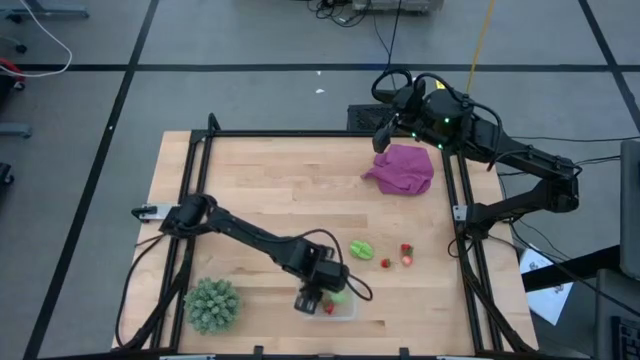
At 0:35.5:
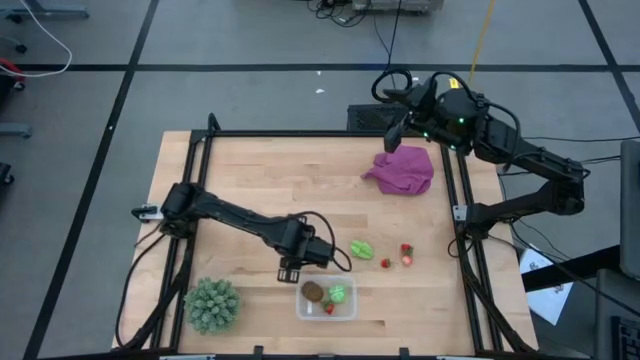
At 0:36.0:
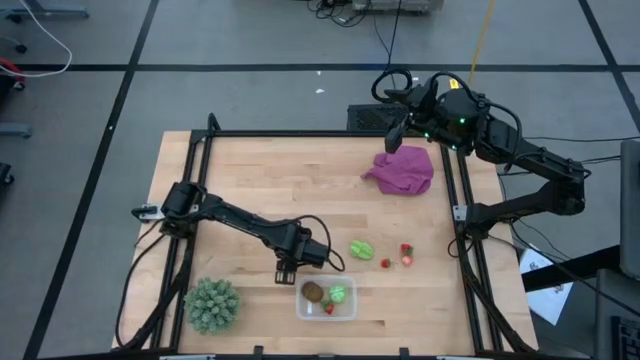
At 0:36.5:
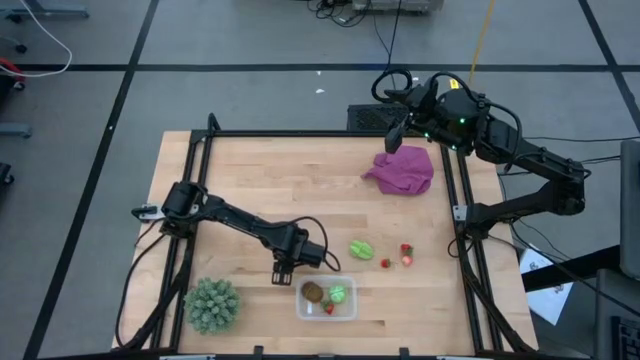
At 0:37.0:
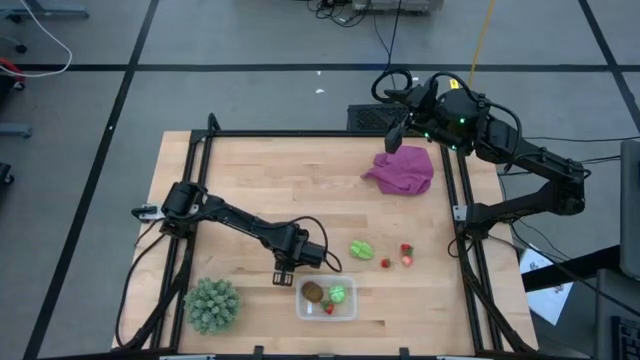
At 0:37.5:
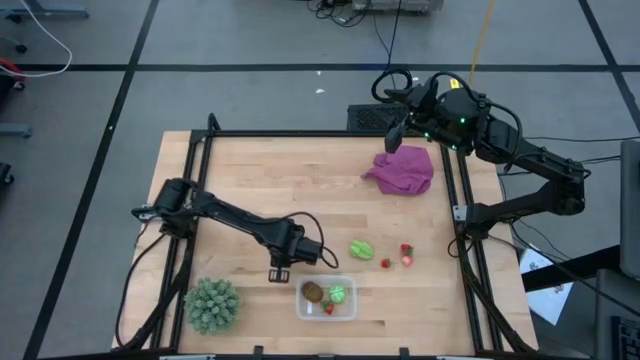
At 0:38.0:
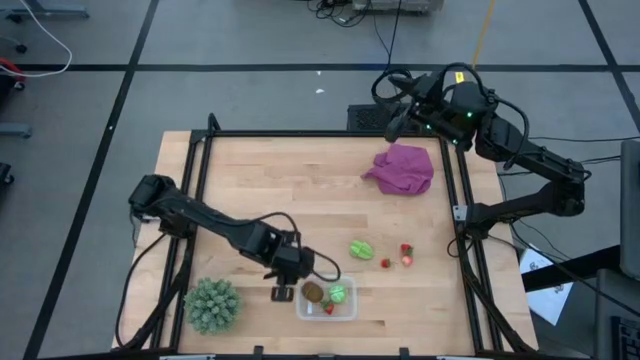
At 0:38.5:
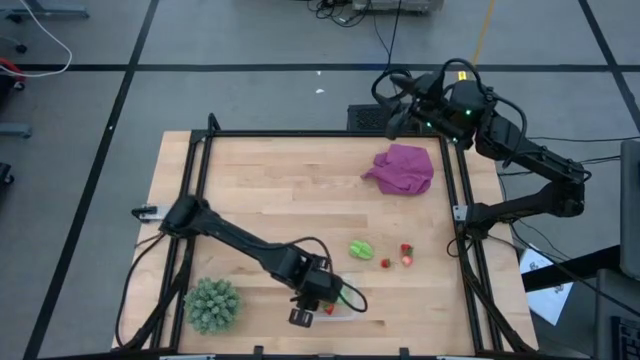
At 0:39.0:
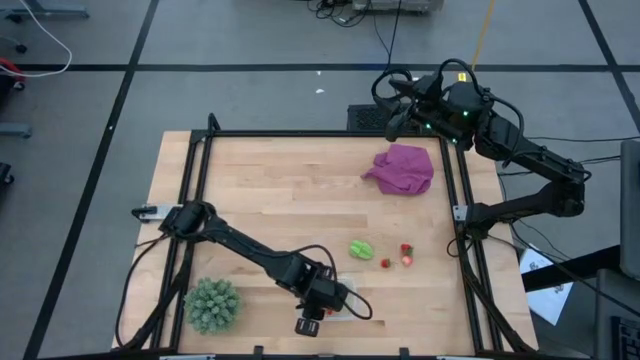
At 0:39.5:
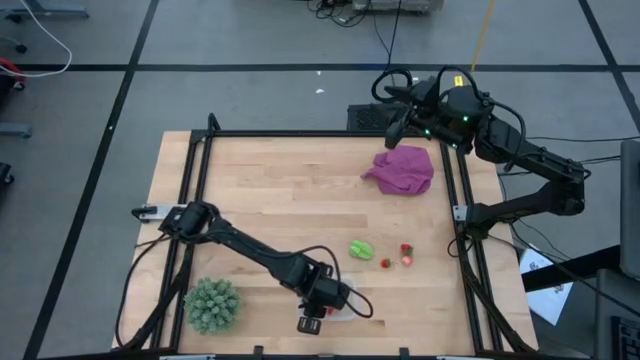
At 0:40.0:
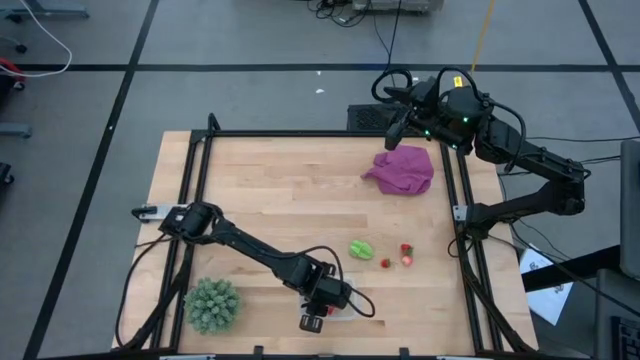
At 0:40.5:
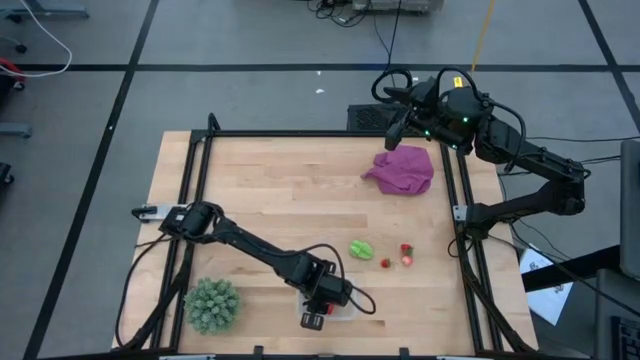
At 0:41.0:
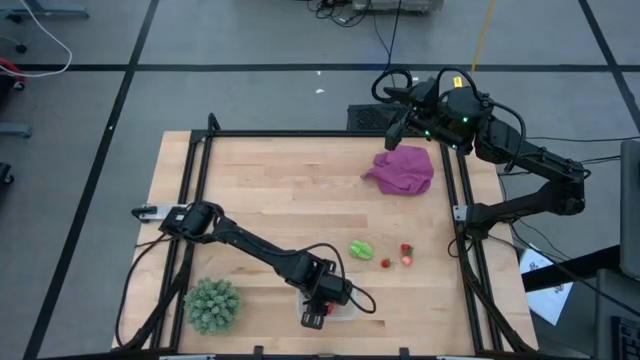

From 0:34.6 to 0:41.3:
Task: Pick and placing Produce into tupperware
Put the left pink peach into the transparent bin

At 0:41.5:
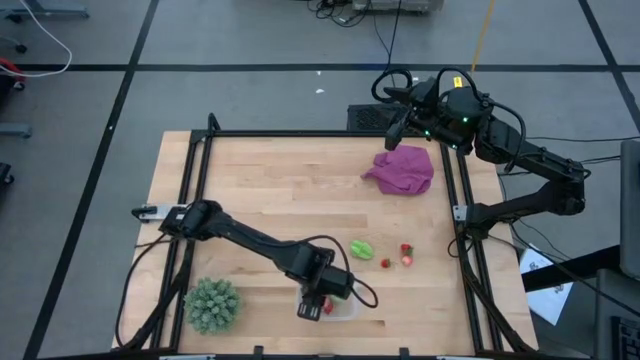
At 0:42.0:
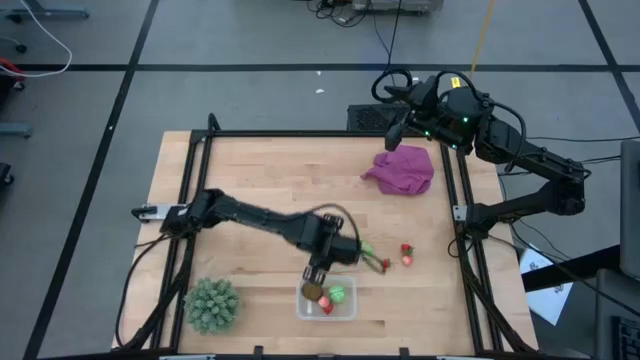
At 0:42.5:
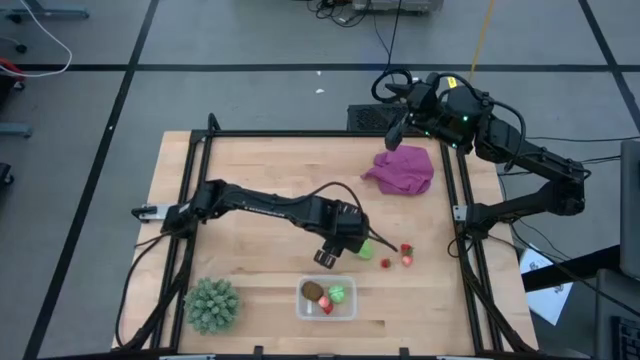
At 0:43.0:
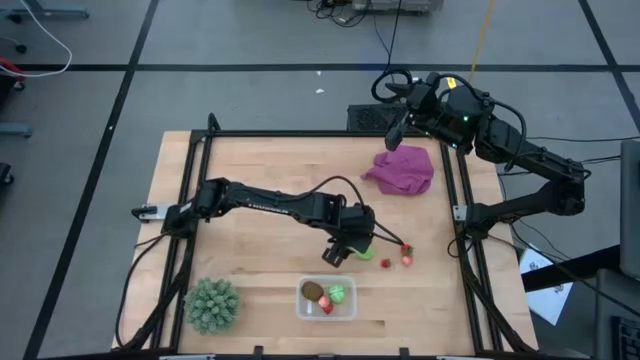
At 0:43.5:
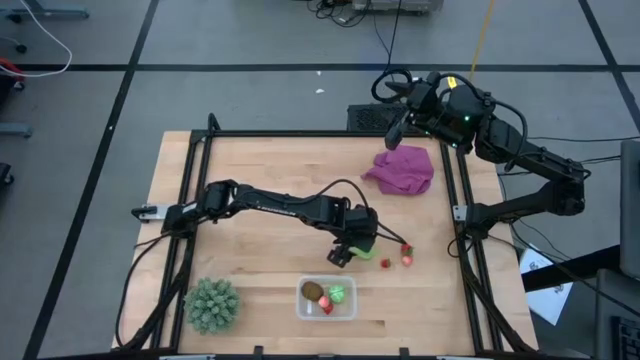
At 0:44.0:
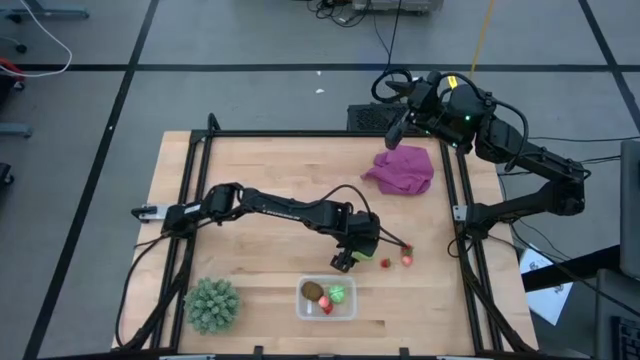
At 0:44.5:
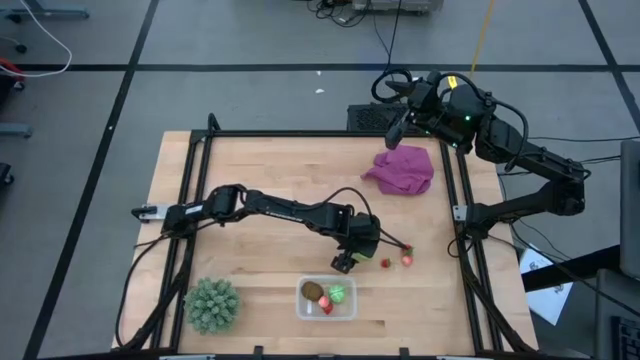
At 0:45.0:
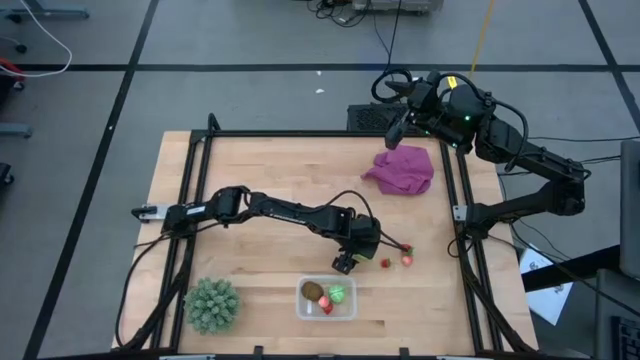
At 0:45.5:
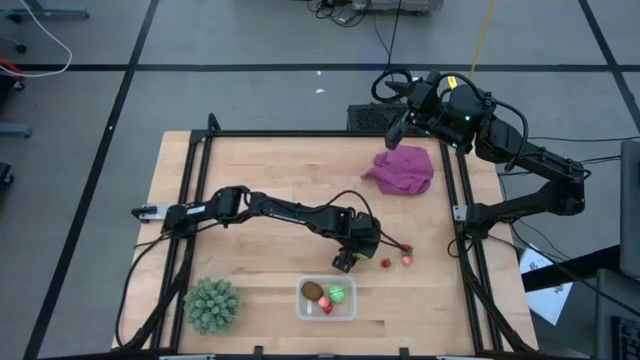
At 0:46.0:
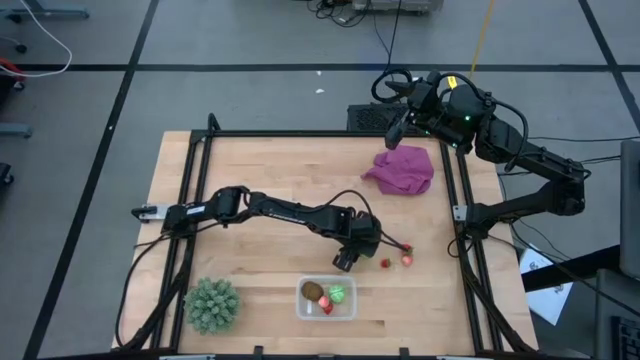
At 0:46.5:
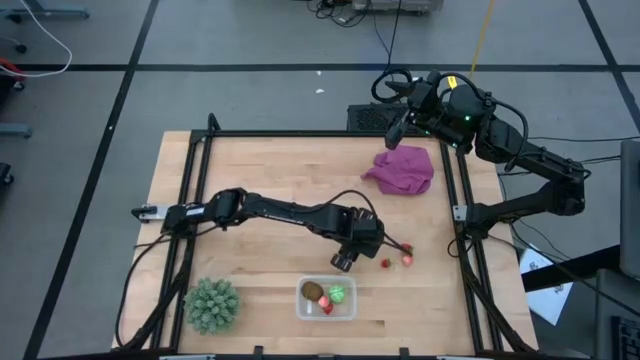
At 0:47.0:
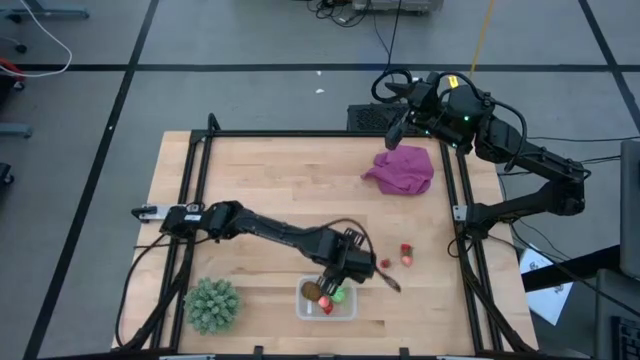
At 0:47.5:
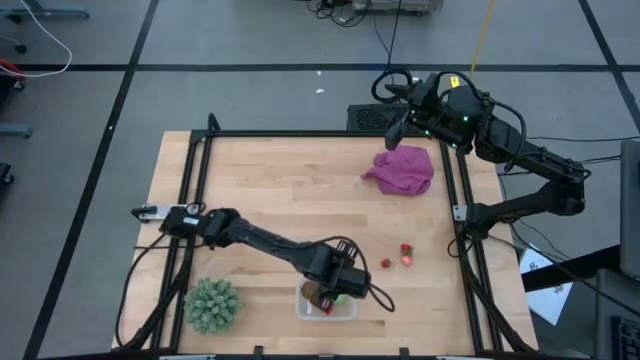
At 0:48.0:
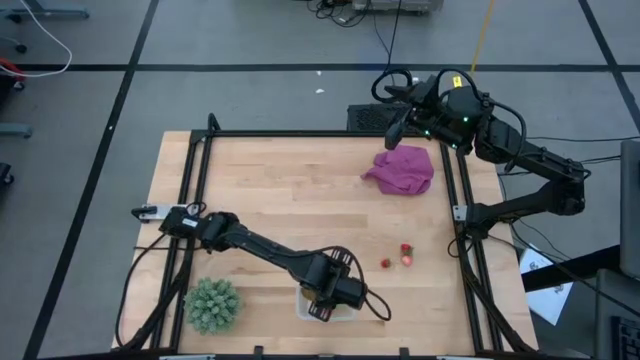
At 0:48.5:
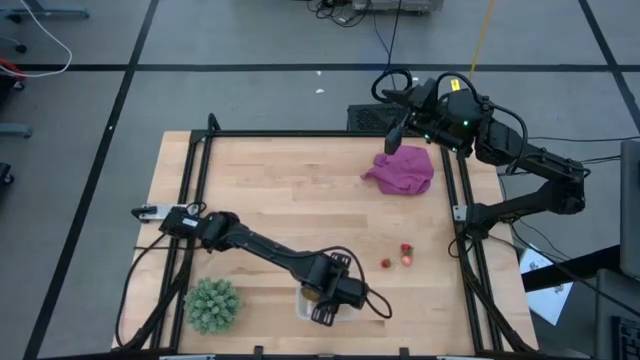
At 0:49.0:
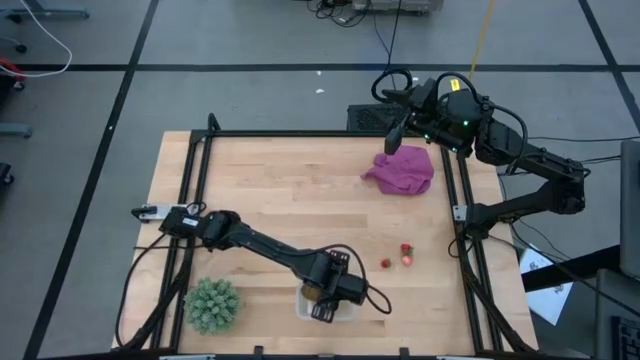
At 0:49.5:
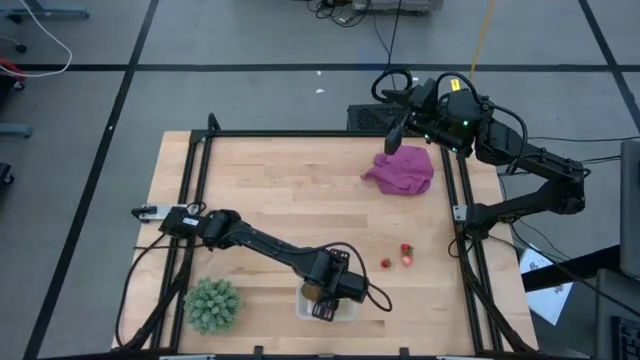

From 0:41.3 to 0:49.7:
Put the green starfruit into the transparent bin

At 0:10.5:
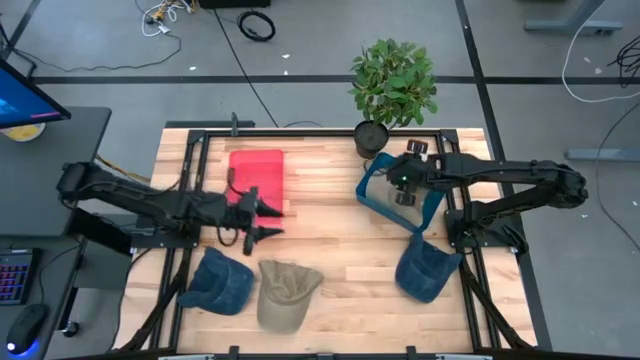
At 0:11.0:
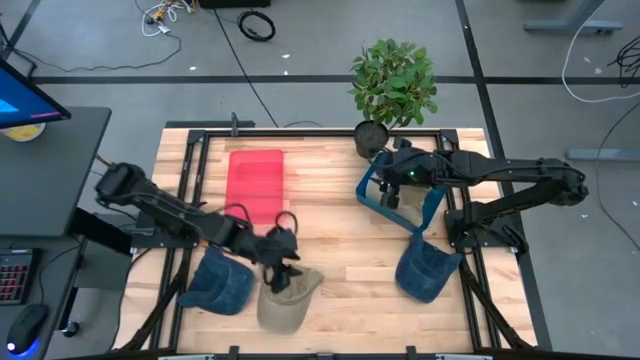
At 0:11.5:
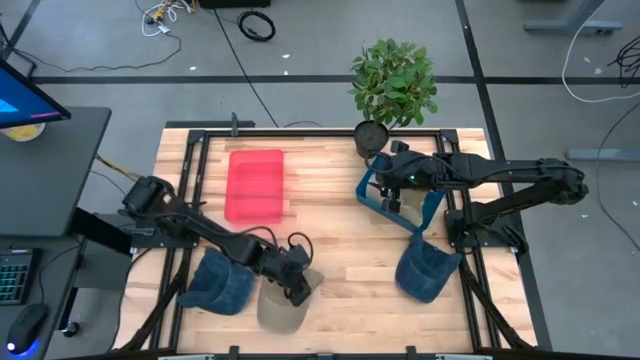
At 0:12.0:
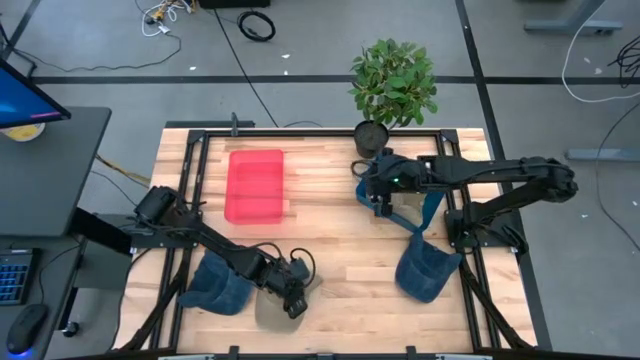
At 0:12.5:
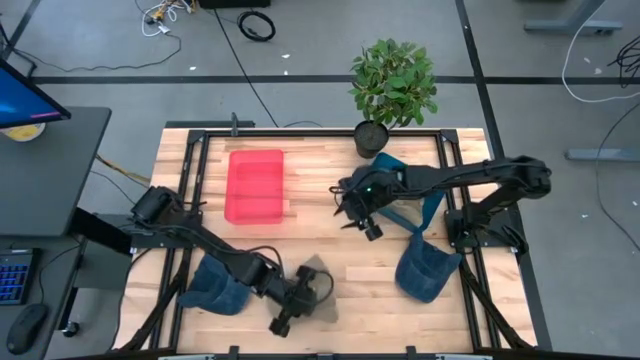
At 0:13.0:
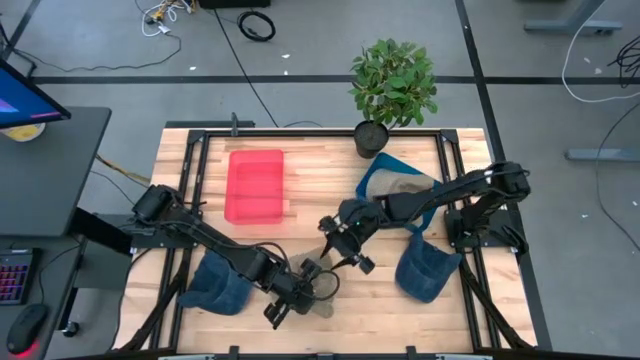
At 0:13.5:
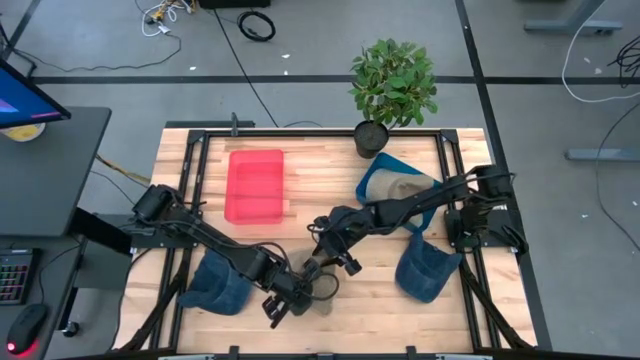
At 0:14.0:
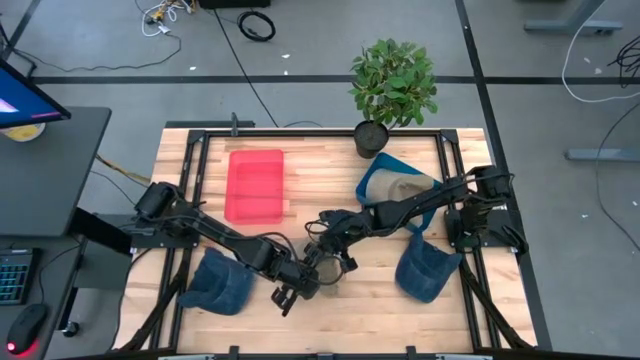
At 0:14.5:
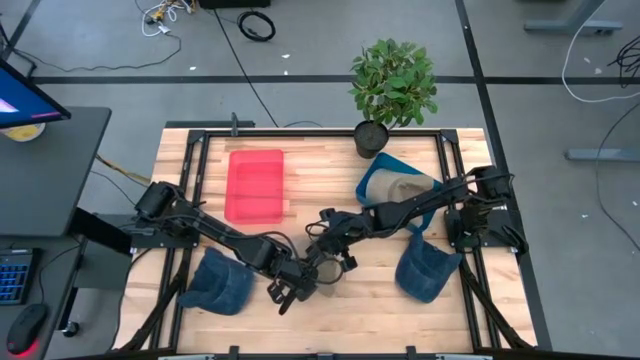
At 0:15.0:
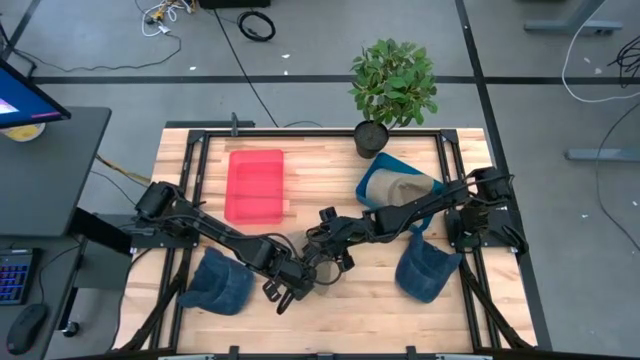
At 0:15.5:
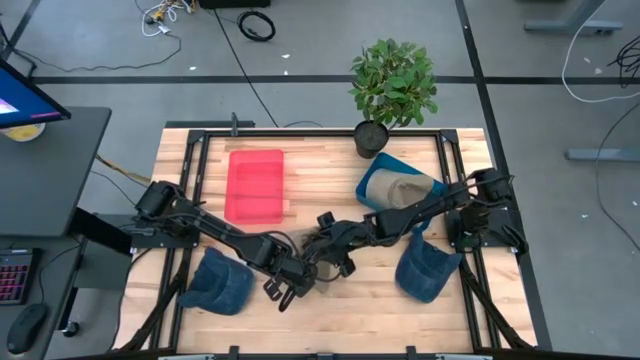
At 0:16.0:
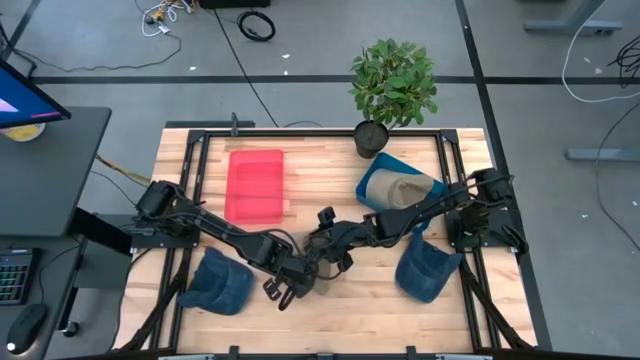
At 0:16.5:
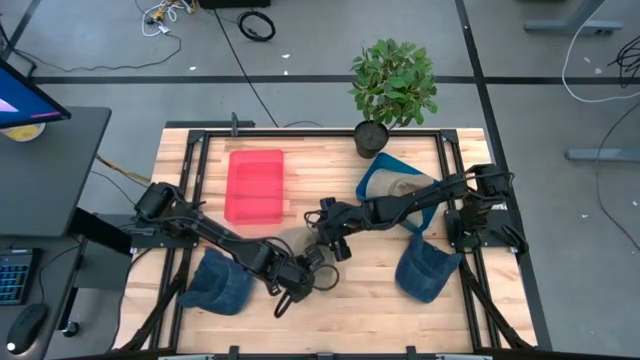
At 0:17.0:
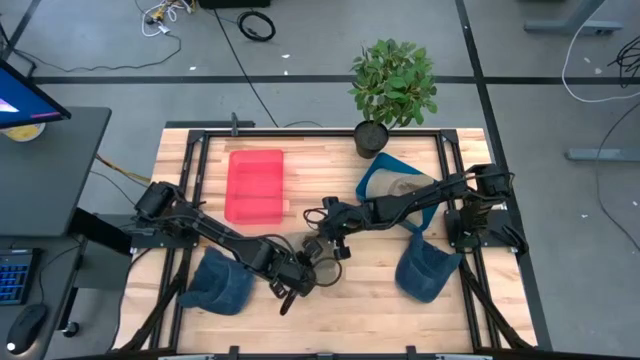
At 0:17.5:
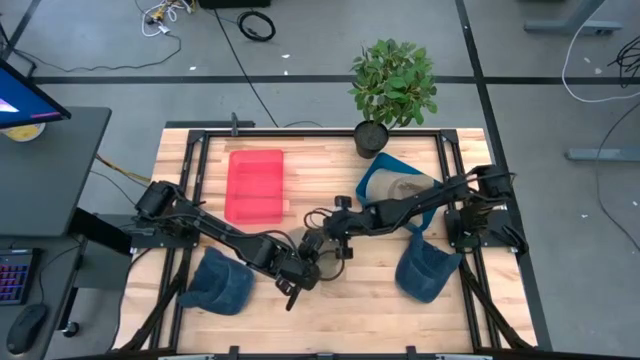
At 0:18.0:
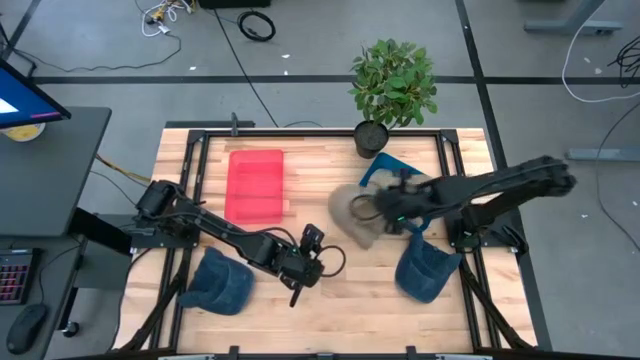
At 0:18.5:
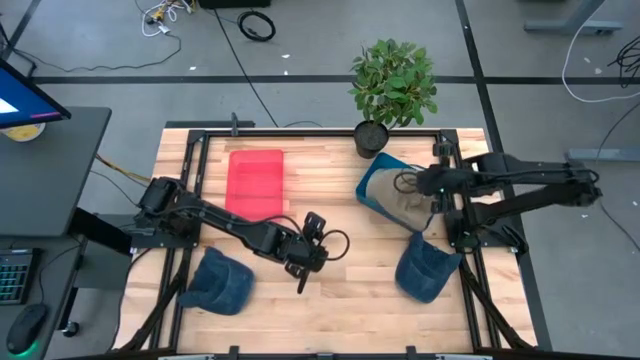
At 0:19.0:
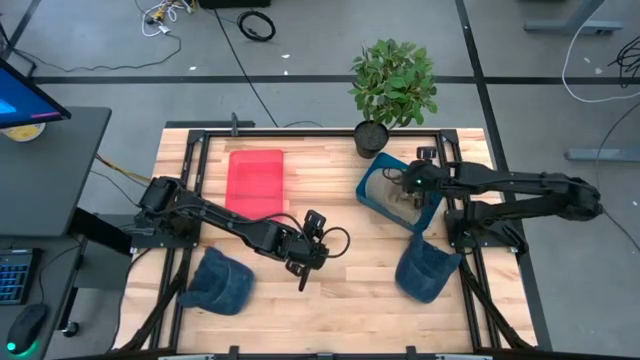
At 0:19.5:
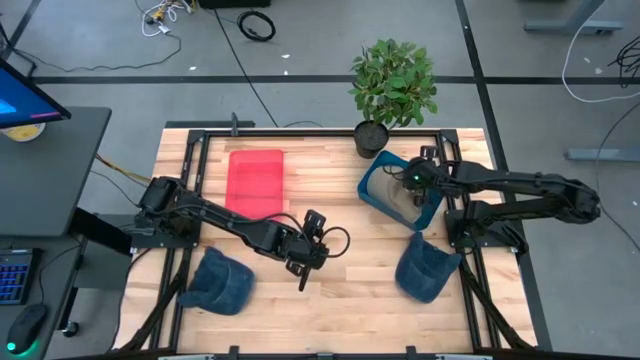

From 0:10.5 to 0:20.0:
Task: Pick & Place hat
Put the brown cap into the blue bin
